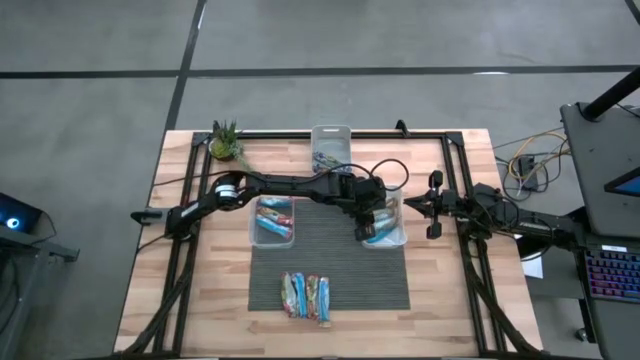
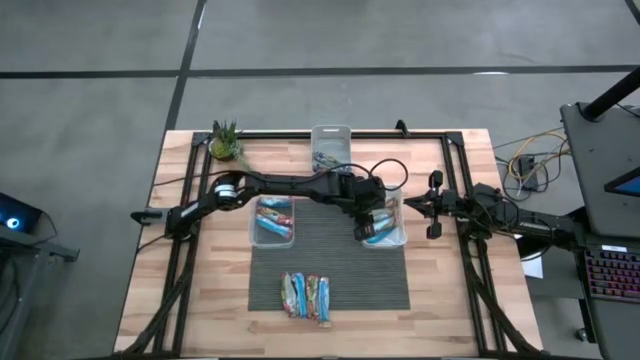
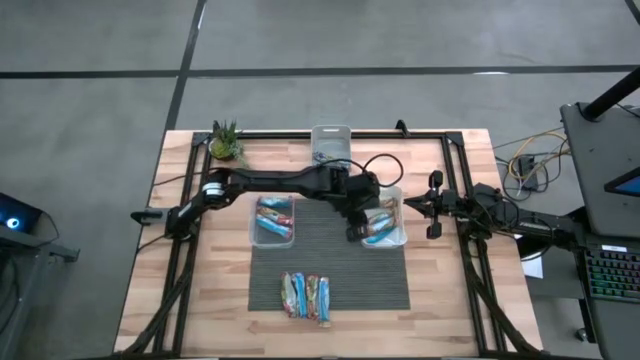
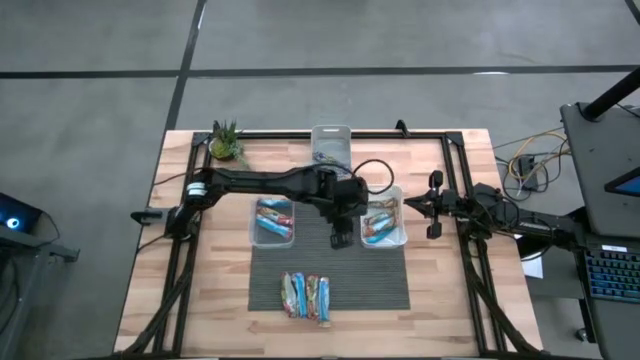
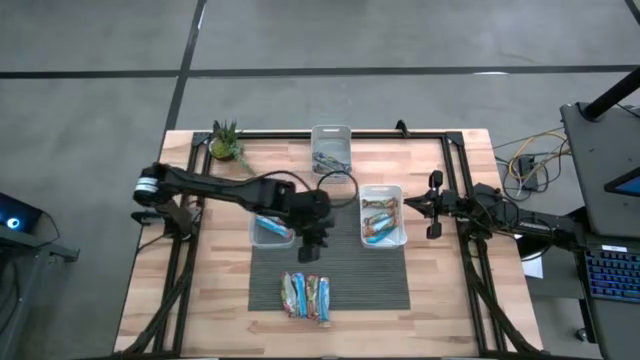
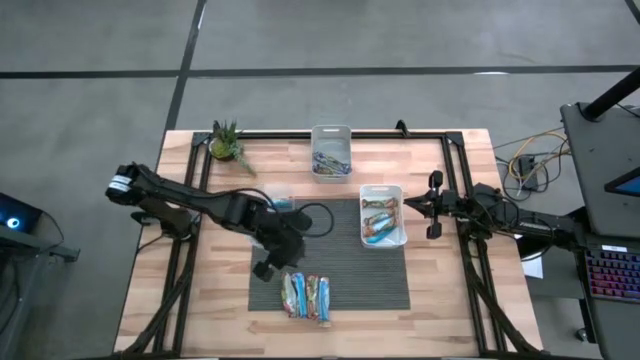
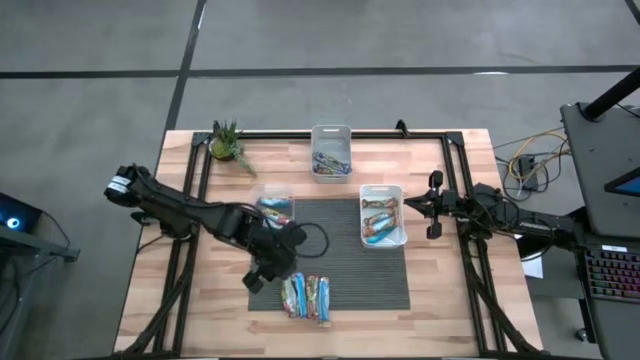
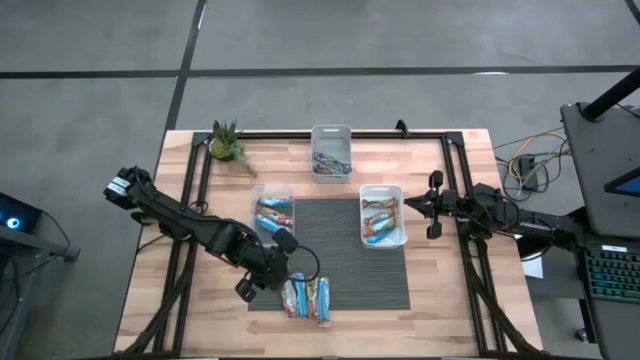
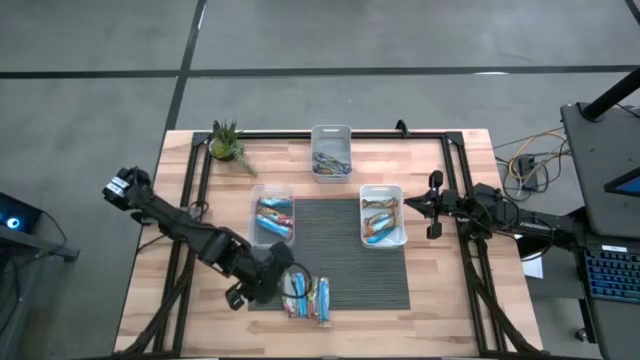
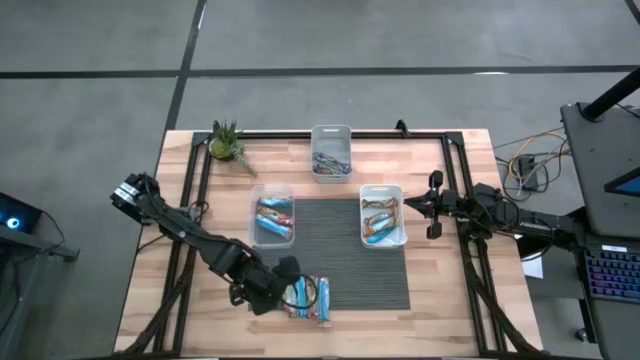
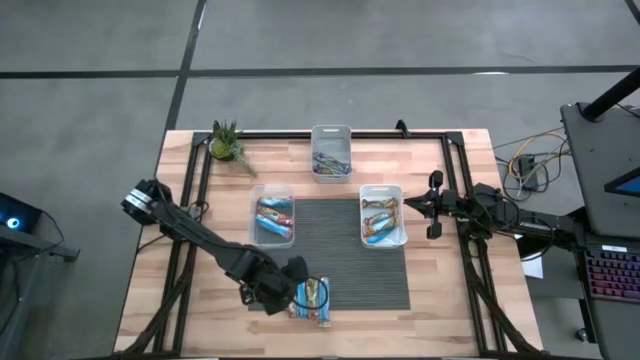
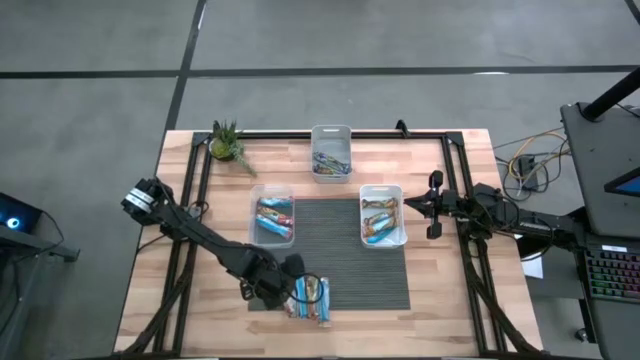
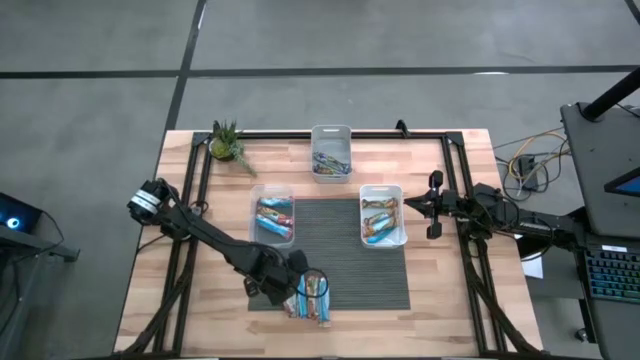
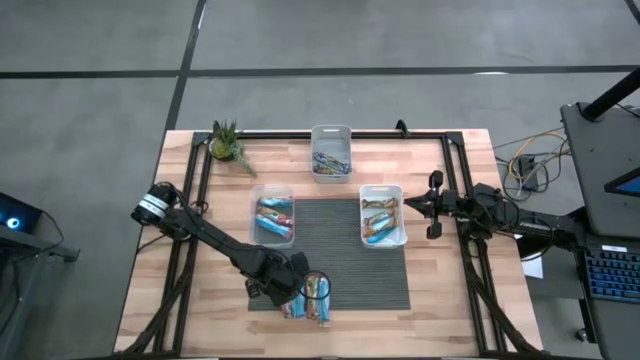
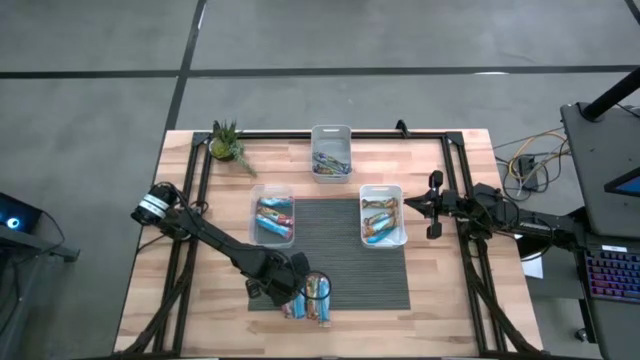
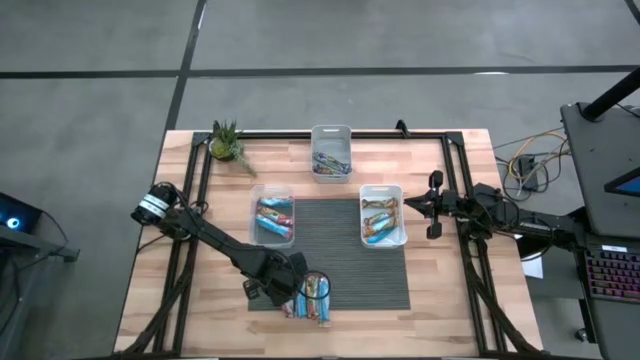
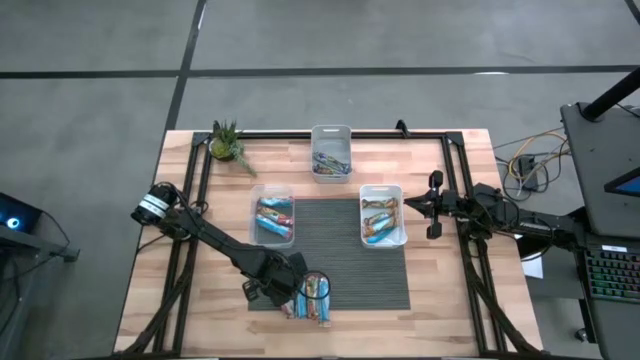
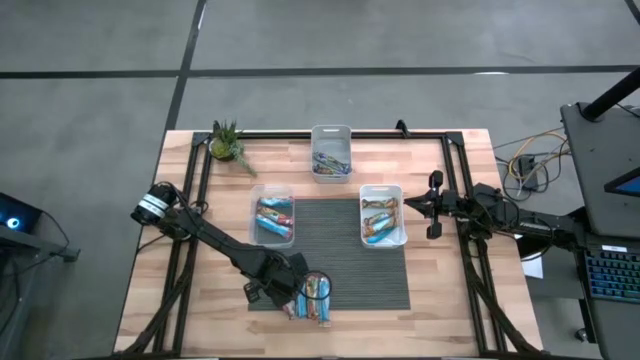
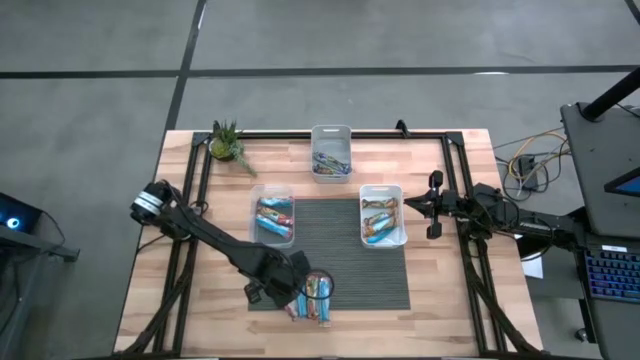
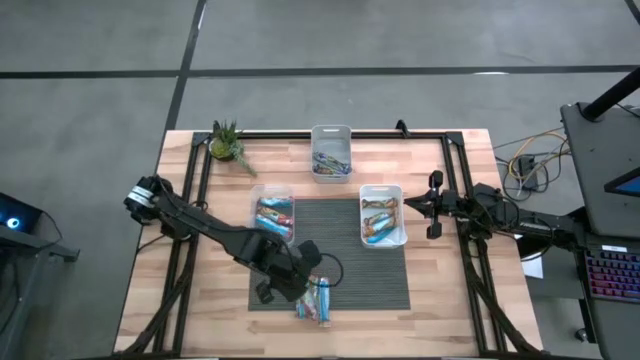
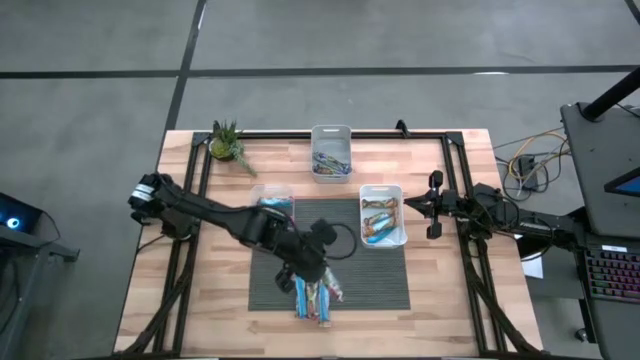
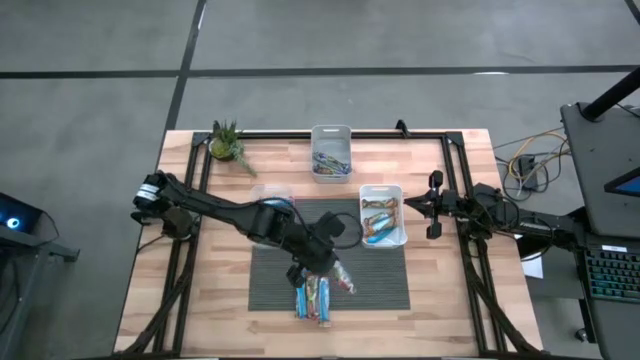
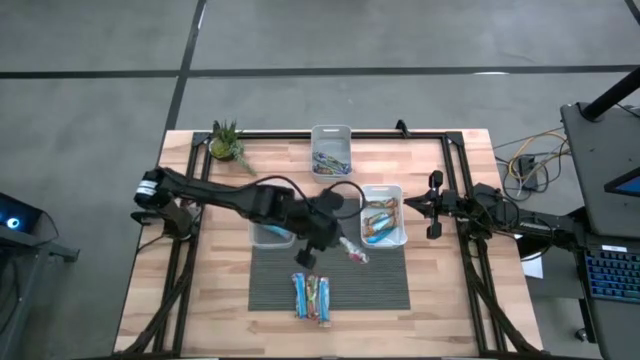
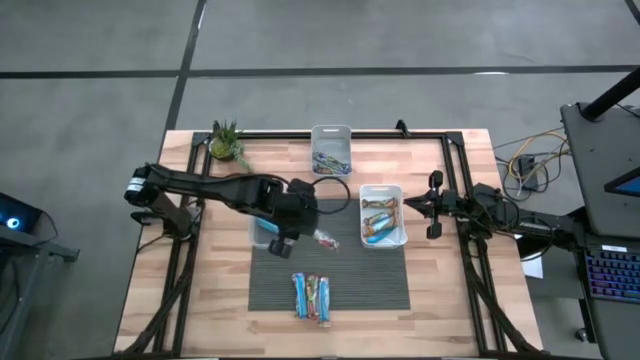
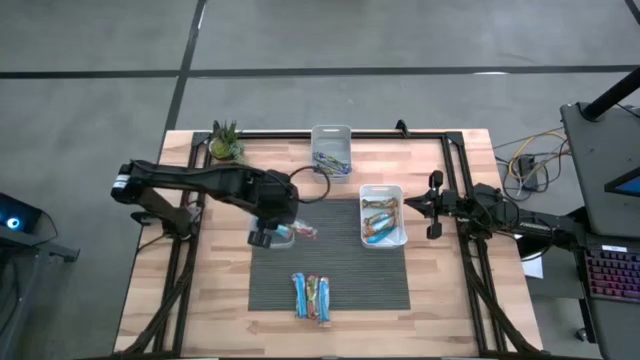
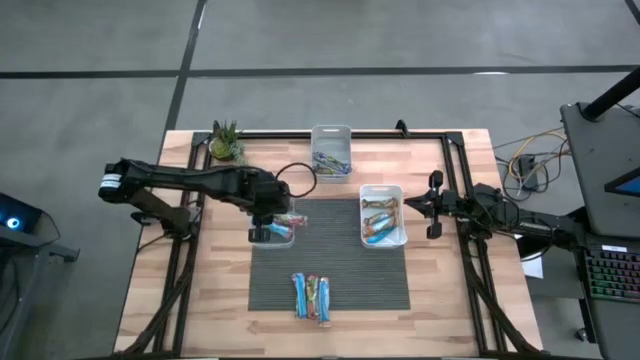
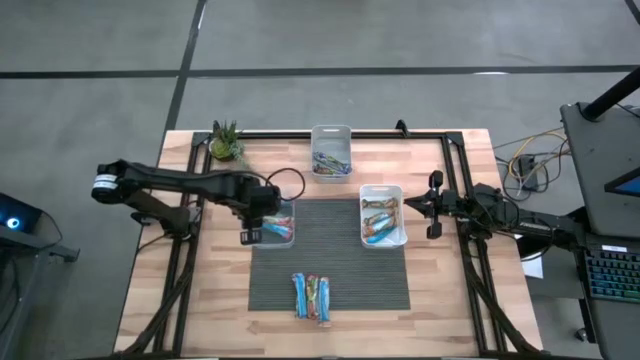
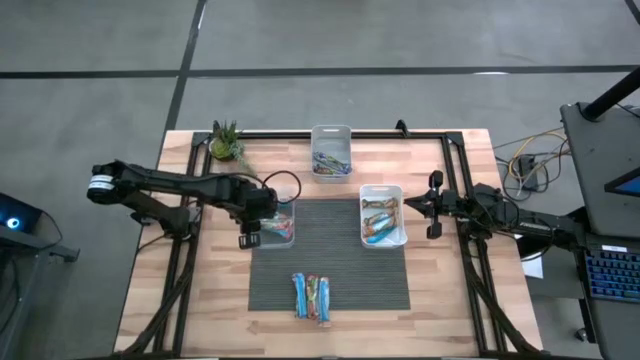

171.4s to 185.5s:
Task: Pick and place Granola Bars by type
Put the red granola bar into the transparent bin

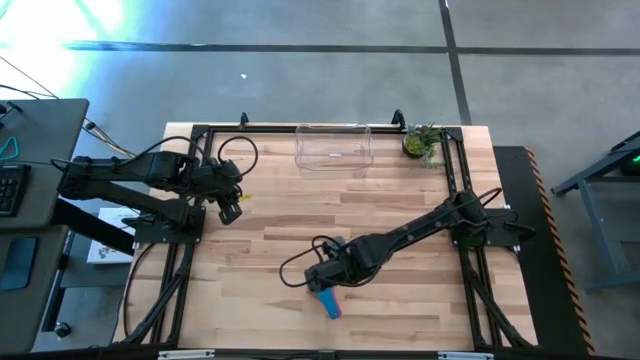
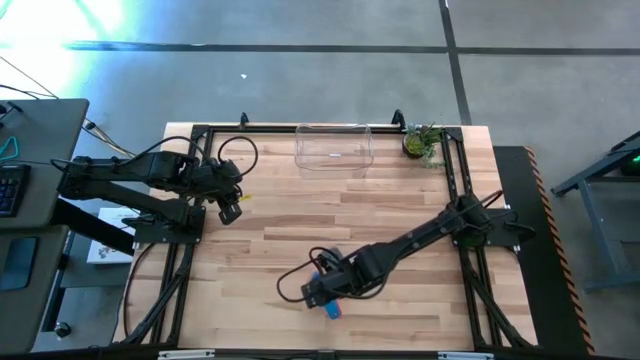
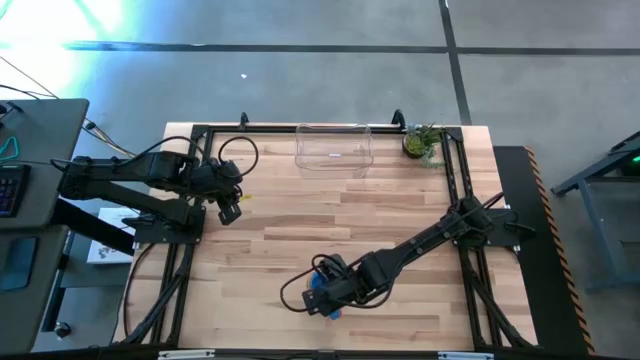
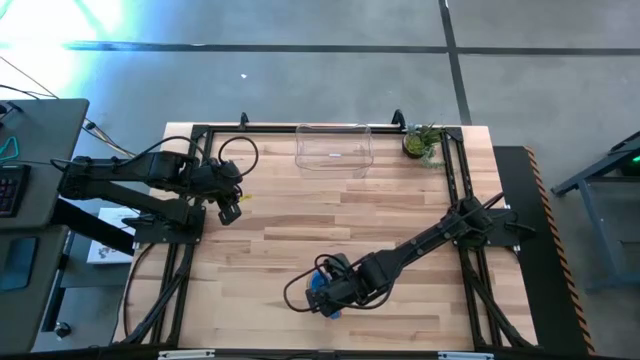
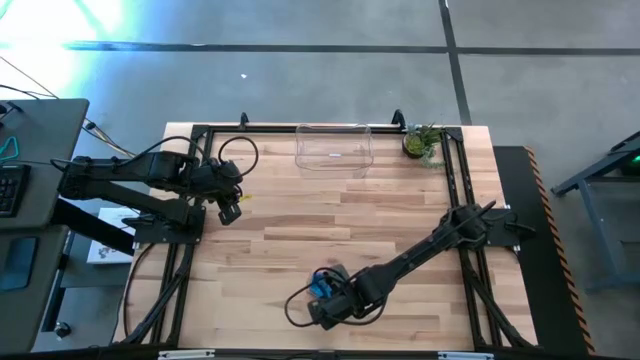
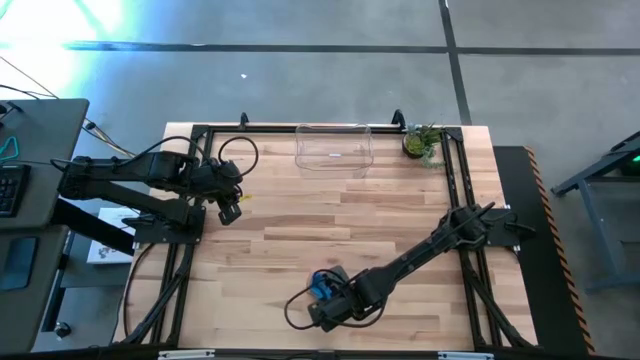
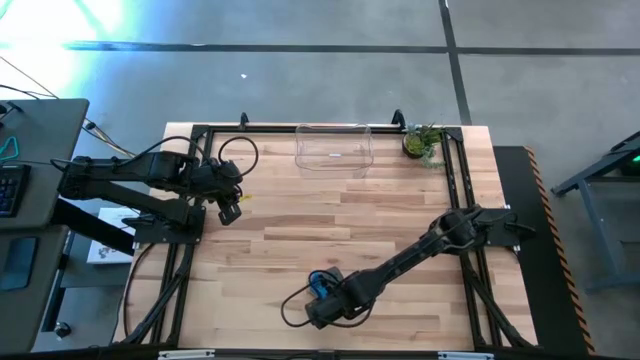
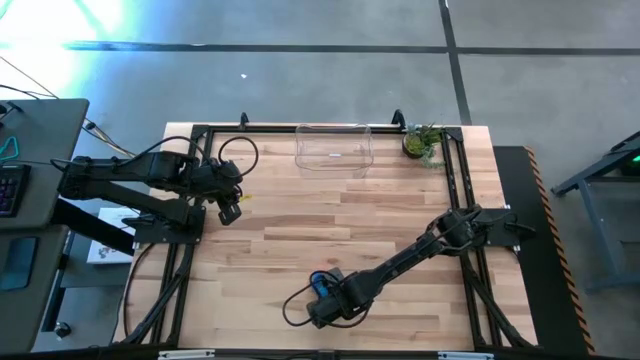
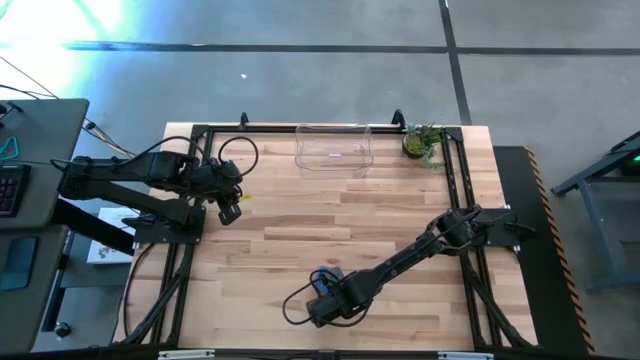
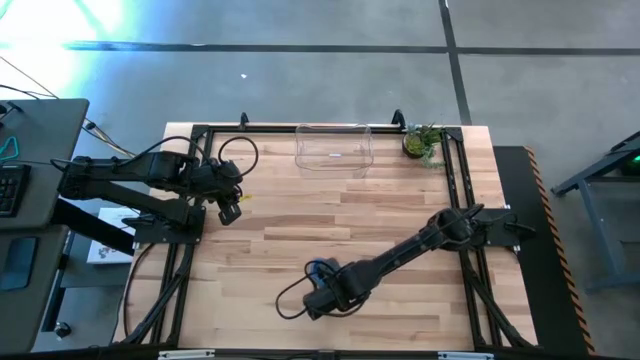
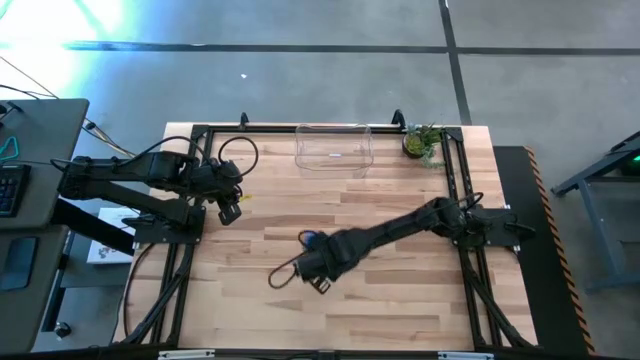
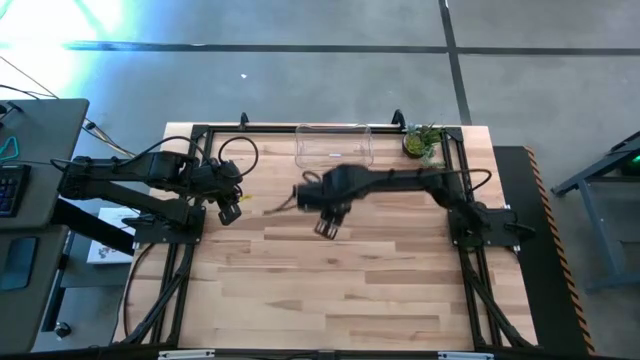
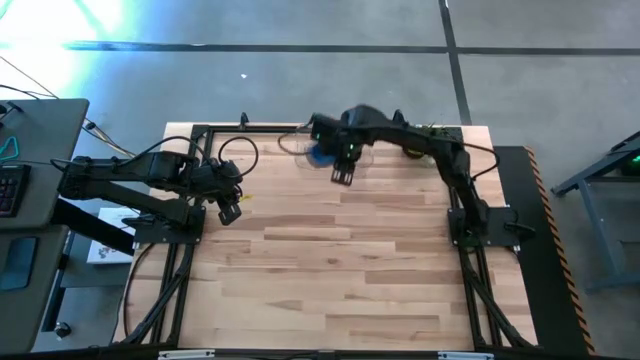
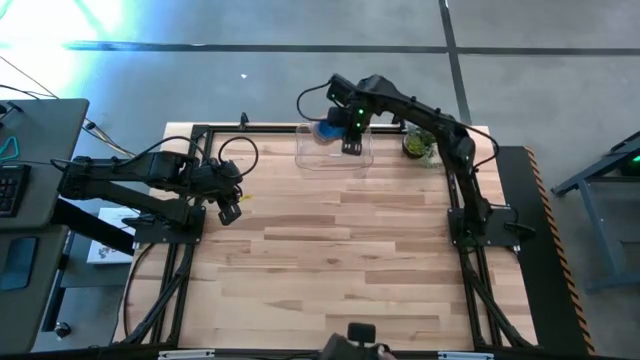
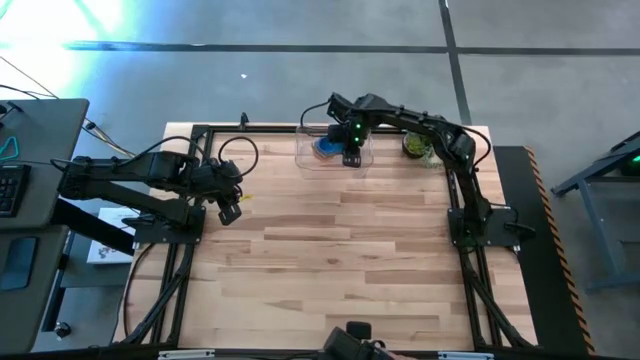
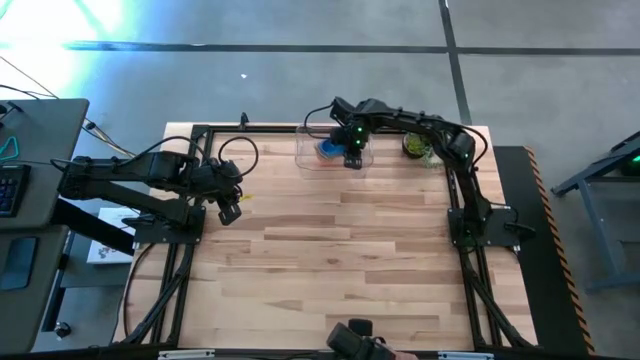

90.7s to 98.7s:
Task: Nest measuring cups in basket
Put the stacked measuring cups into the transparent bin
